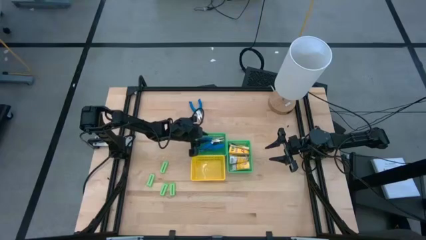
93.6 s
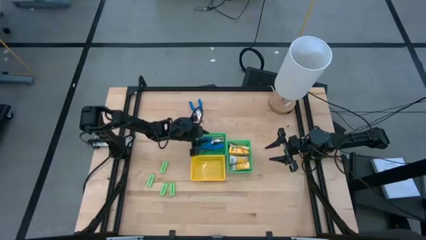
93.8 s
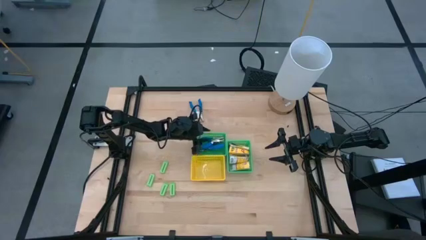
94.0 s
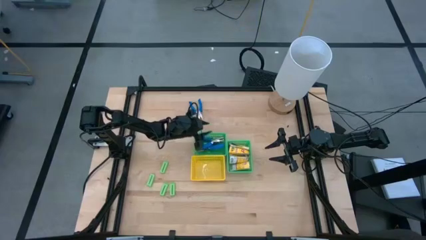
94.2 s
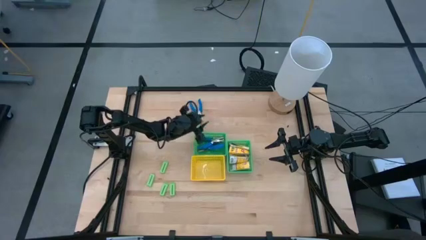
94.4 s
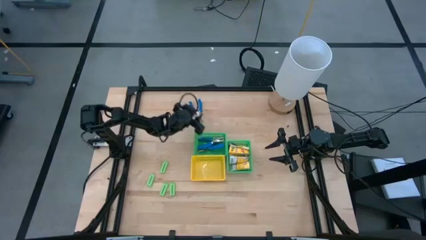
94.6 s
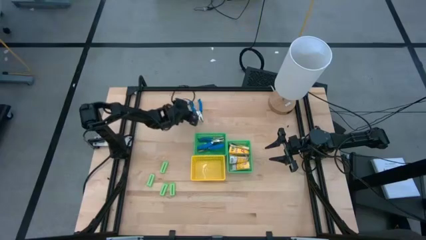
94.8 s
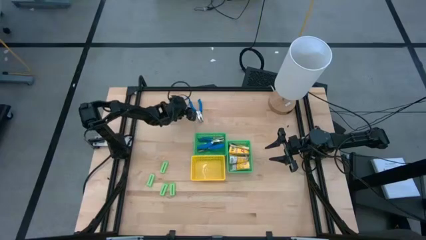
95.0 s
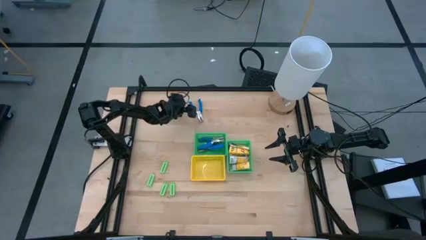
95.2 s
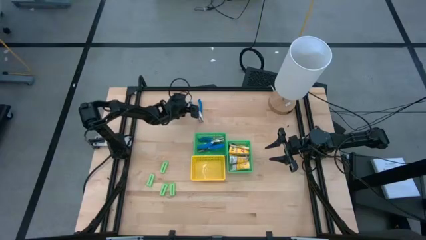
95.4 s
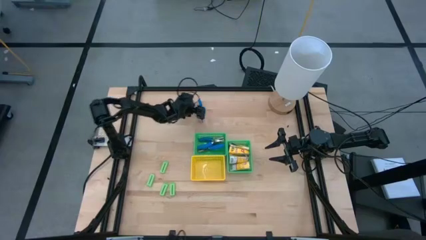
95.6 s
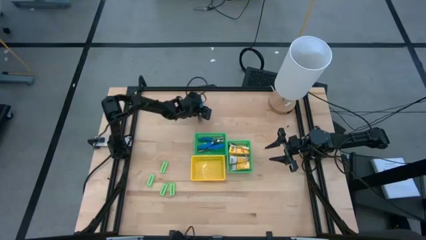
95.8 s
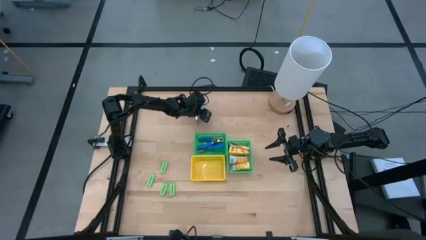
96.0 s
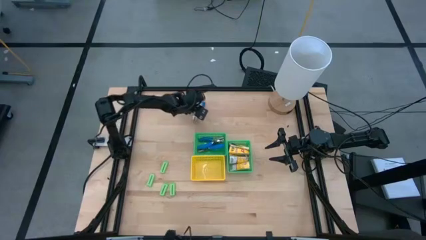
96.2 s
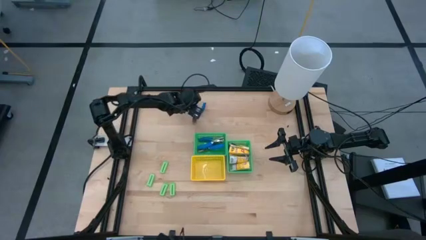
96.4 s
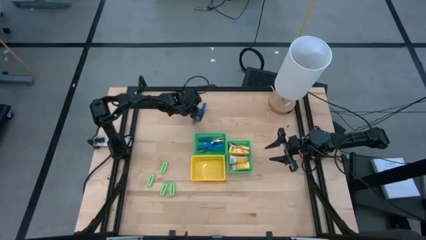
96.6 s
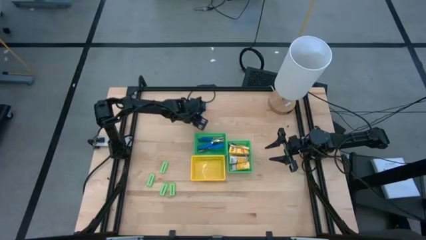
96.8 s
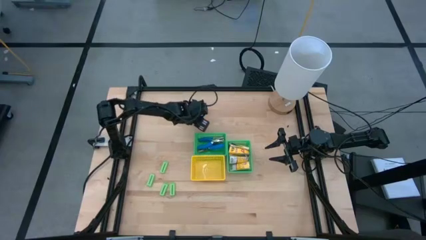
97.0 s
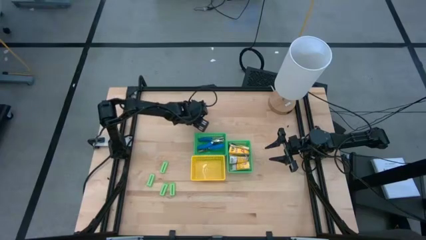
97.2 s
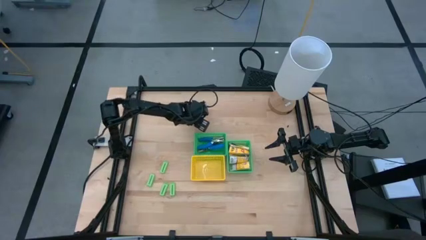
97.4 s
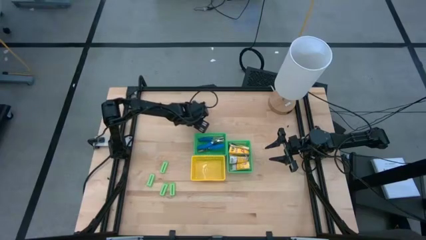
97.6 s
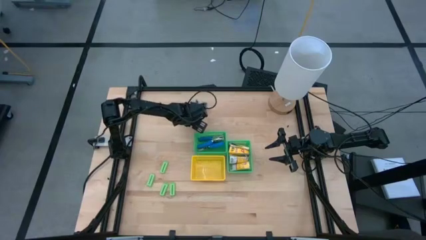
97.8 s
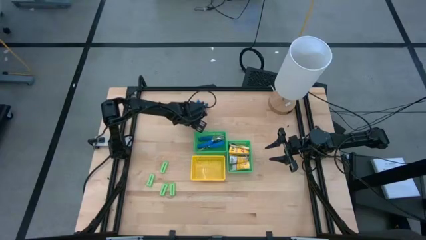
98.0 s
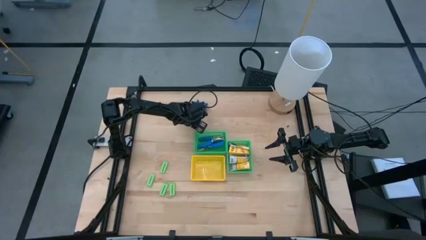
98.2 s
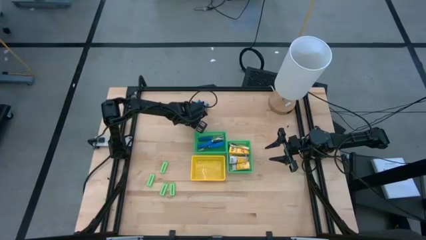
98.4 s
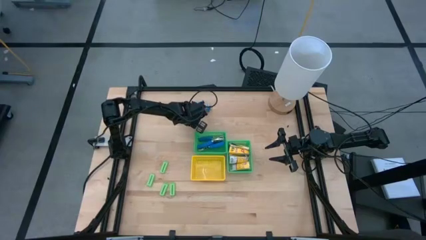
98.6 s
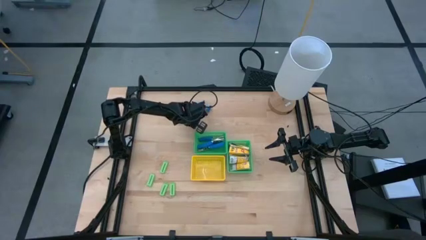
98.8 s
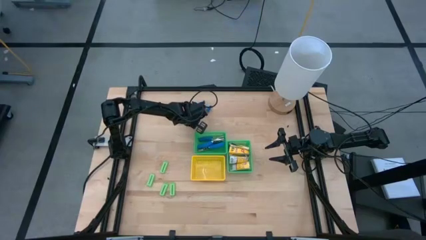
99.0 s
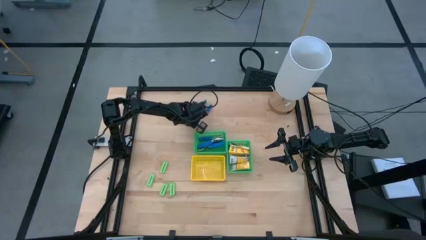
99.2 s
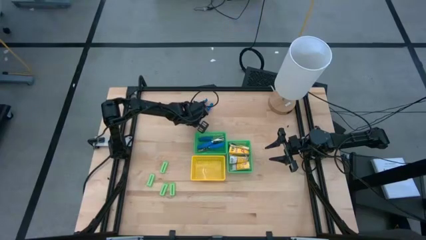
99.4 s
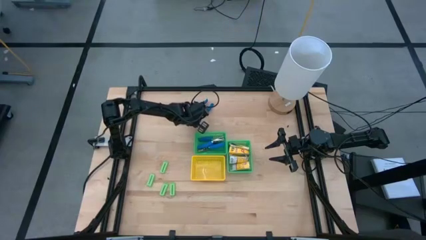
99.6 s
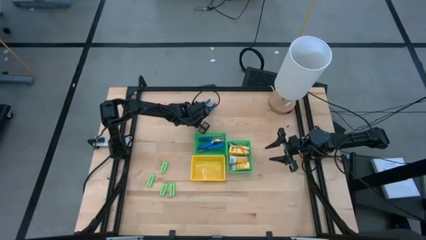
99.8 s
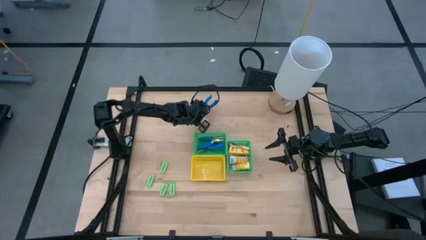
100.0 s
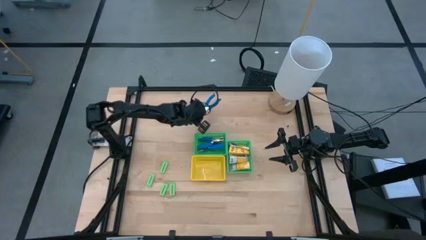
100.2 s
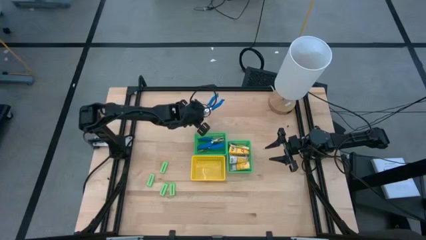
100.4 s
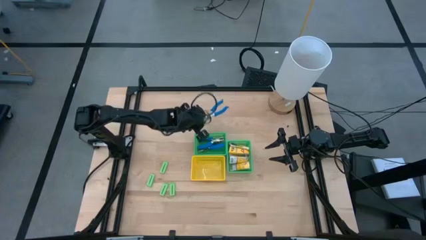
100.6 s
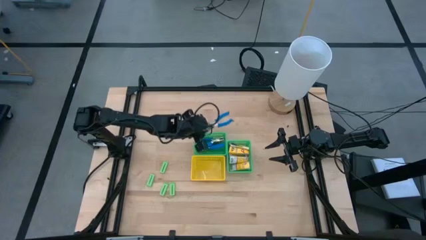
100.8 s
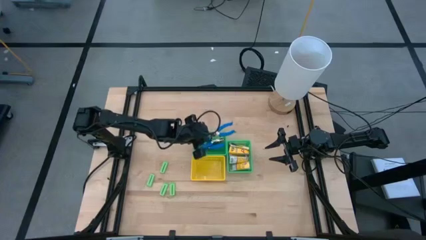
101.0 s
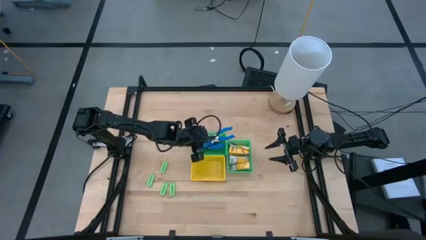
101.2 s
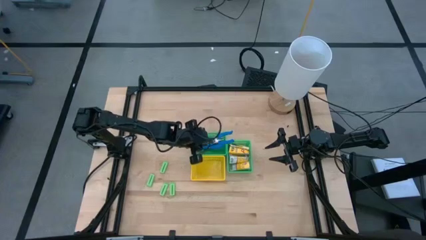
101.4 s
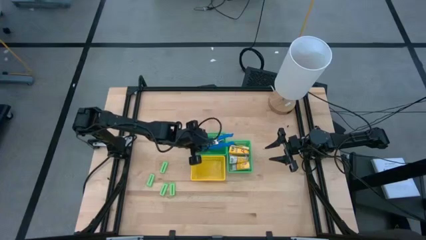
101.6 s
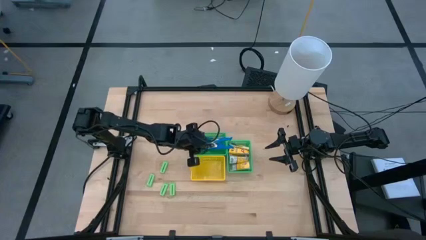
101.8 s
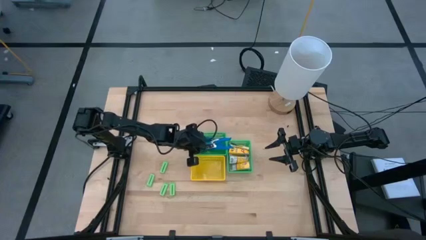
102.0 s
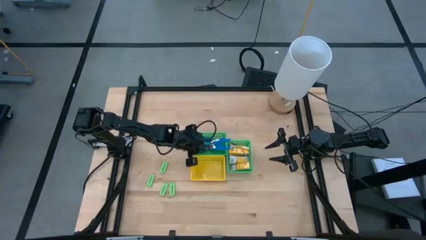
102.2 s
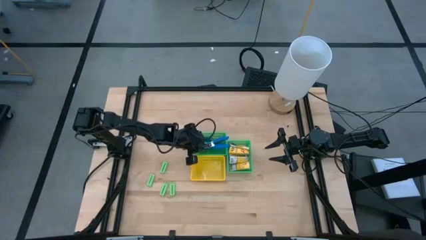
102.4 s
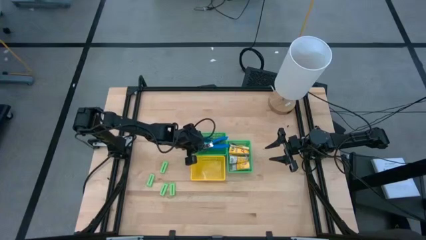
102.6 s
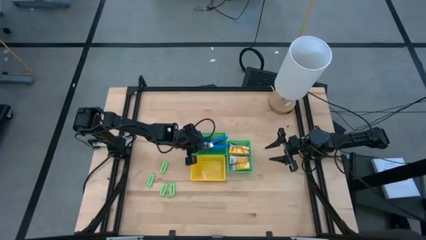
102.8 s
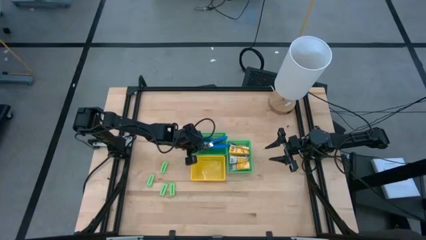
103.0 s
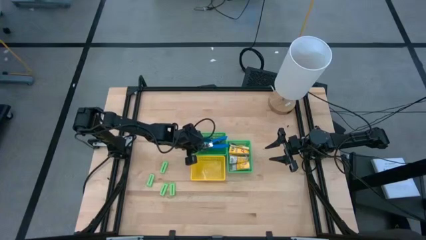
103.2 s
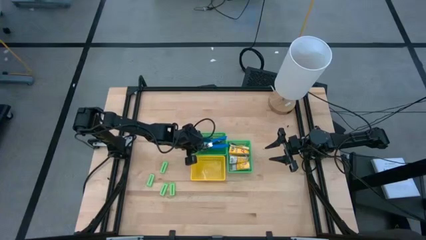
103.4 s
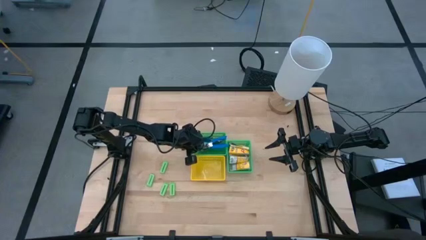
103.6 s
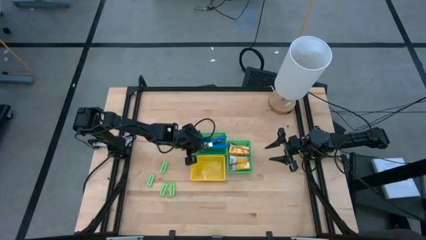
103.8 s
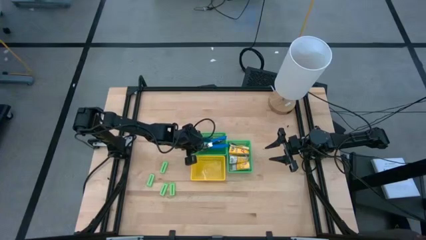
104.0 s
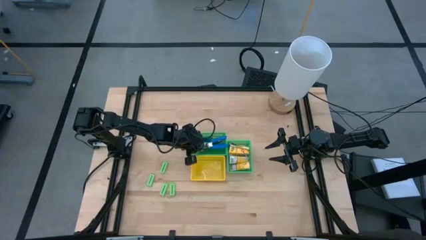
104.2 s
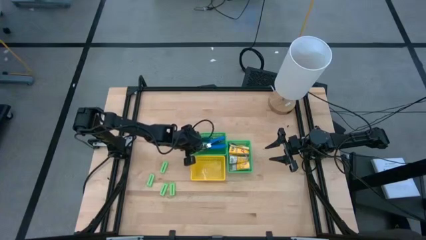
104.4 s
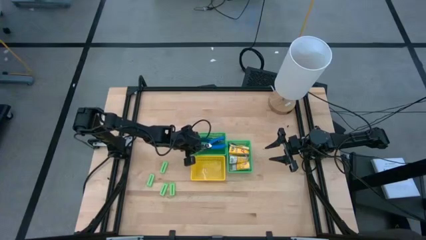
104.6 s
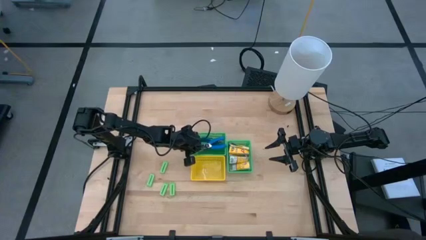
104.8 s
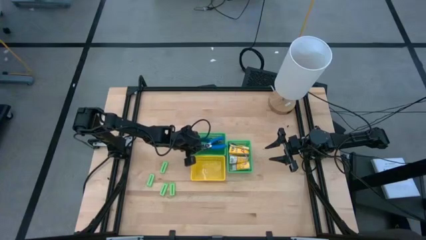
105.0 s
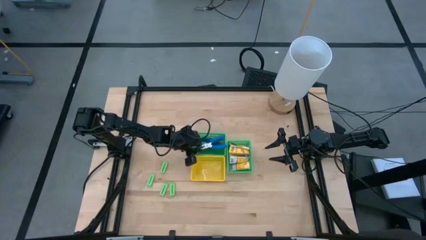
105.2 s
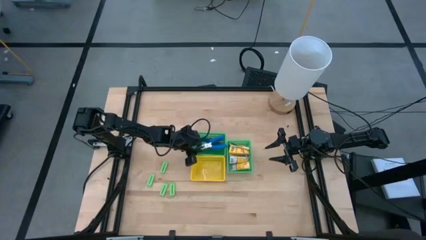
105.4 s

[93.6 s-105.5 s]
Task: Pick & Place School Supplies
Put the blue hole puncher into the right green bin
